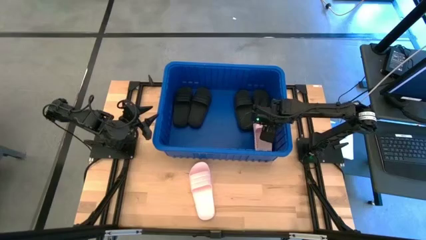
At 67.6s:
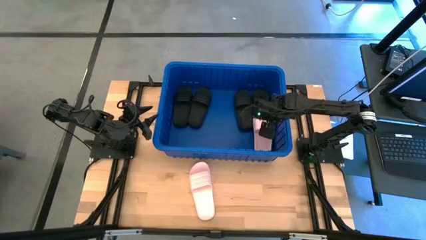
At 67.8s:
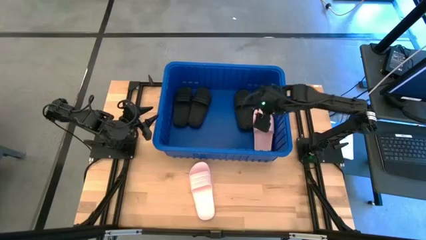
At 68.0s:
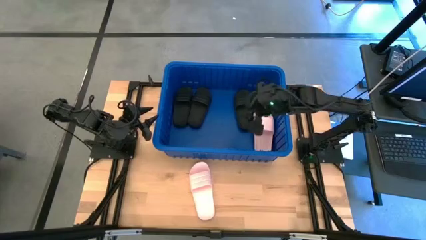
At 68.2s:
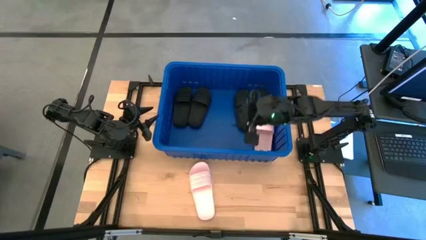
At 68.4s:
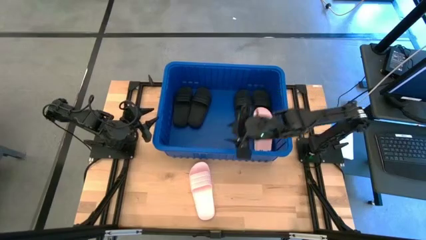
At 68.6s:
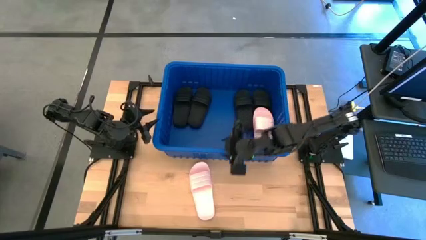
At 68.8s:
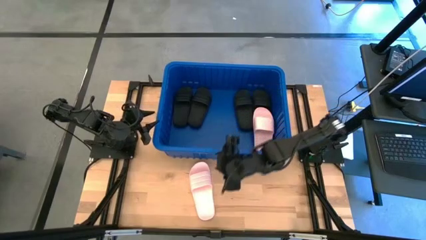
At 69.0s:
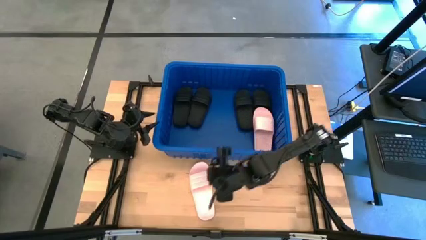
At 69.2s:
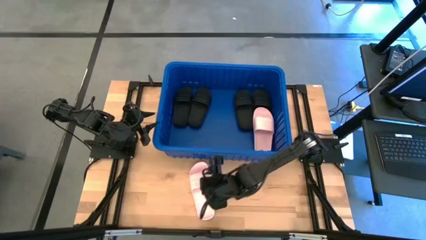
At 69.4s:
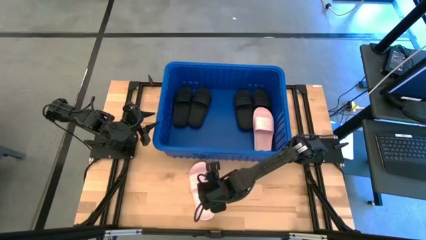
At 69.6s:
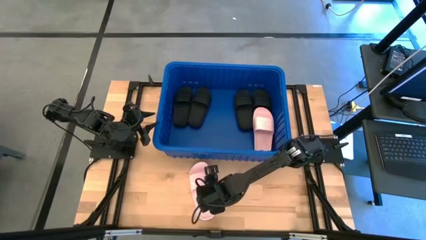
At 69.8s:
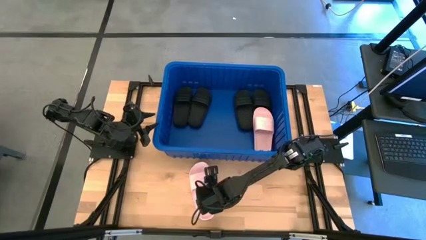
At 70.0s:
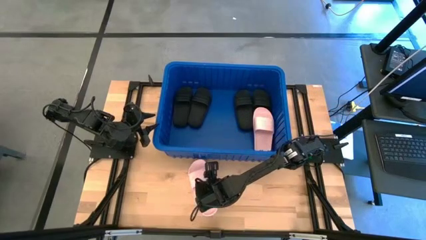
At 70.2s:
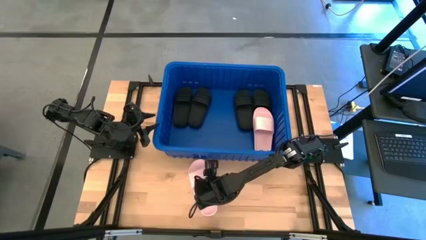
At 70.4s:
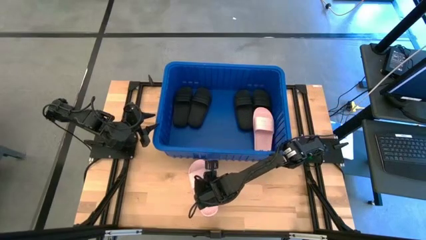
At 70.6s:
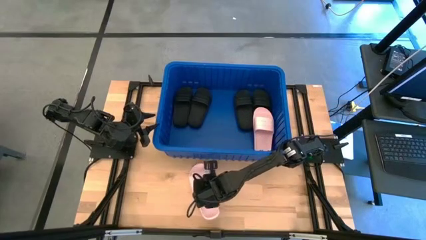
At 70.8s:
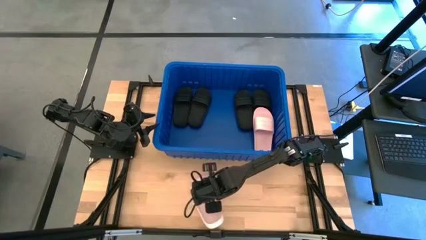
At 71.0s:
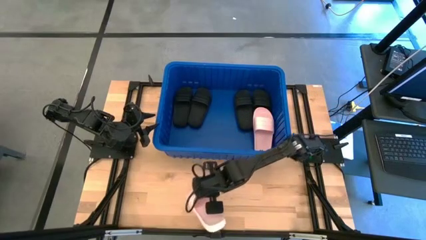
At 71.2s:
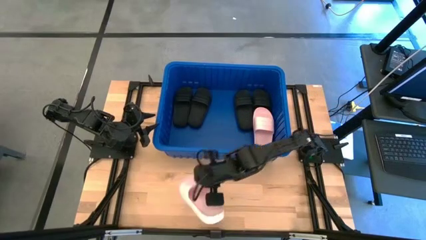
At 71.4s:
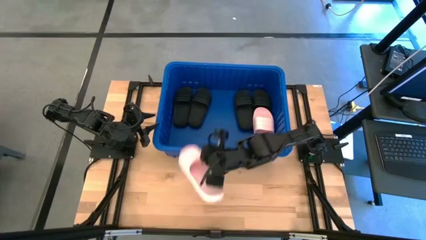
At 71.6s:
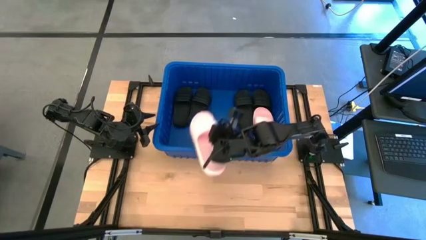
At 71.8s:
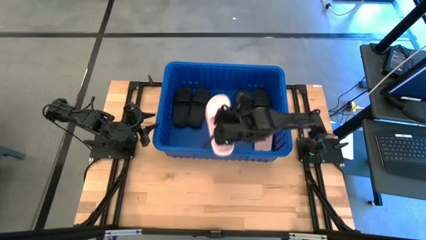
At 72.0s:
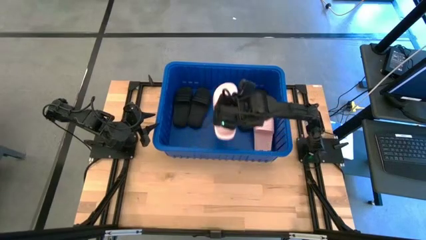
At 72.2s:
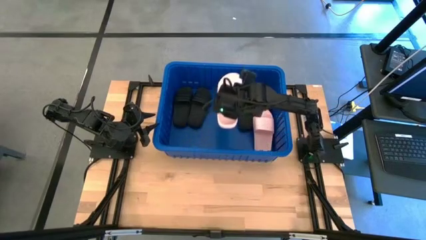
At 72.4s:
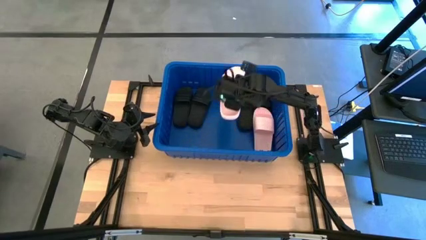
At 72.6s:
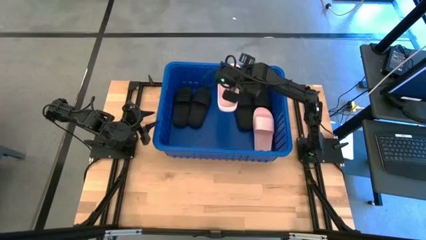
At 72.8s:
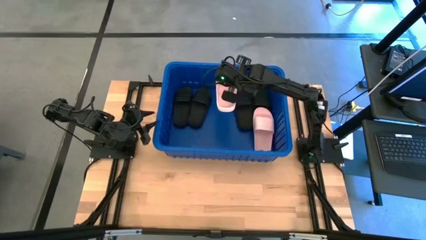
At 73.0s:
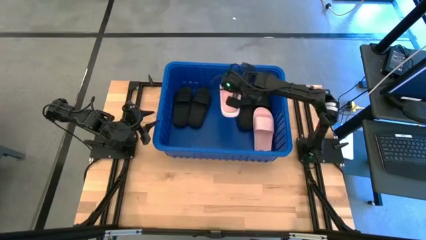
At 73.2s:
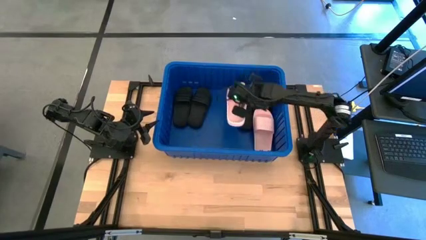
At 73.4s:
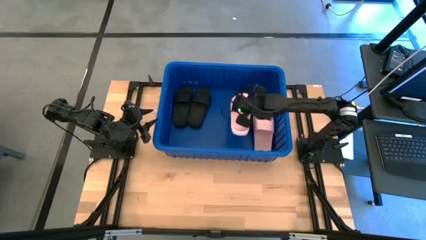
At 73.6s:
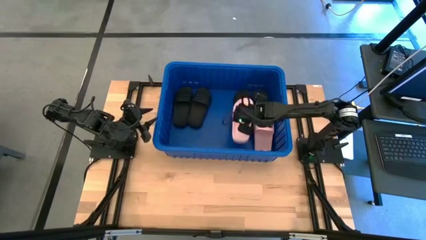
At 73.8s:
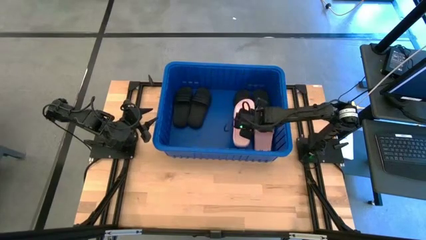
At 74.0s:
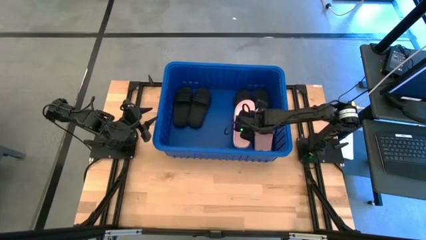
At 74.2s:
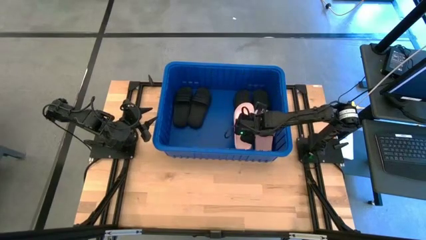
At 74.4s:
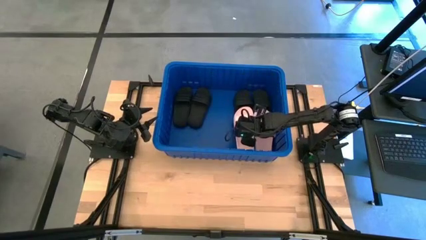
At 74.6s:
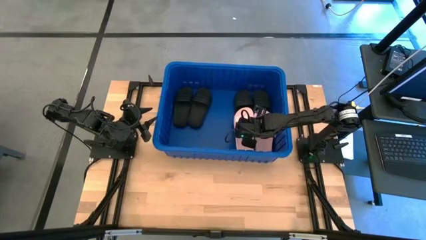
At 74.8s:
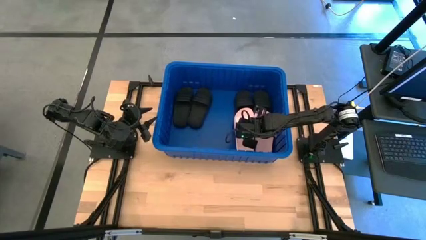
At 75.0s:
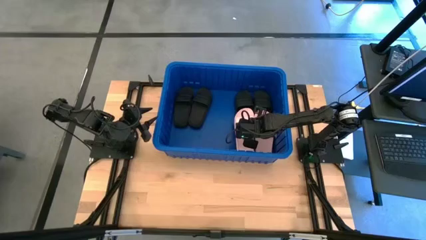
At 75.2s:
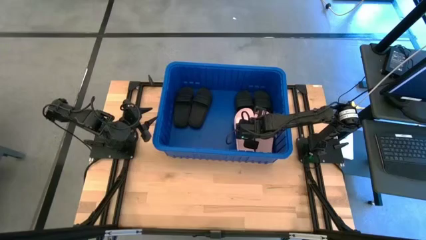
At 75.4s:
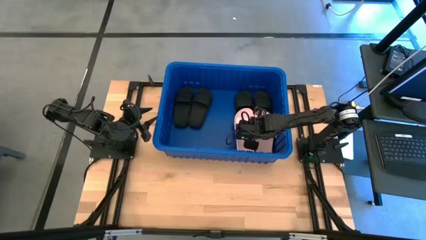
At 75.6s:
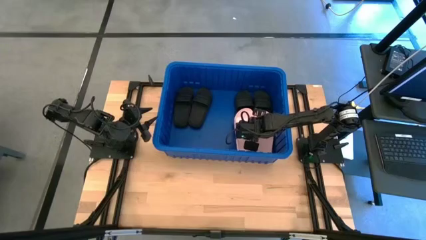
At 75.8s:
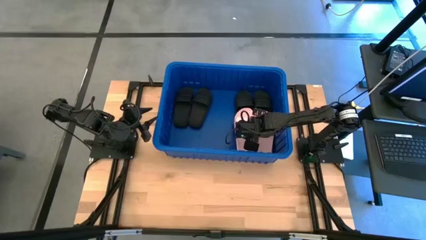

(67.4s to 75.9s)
Task: Pick and place slides into bin
Put the pink slide into the blue bin

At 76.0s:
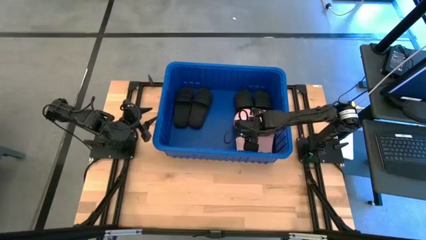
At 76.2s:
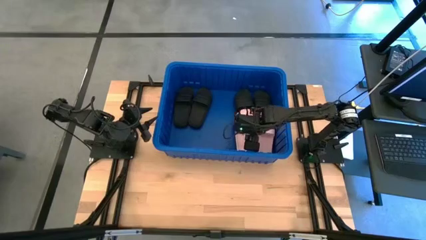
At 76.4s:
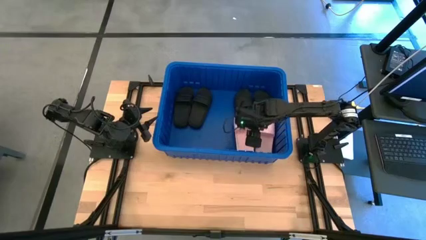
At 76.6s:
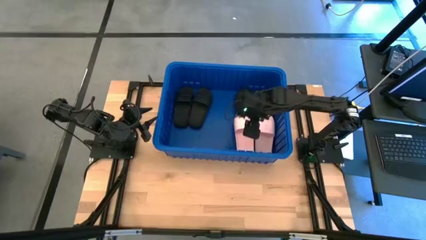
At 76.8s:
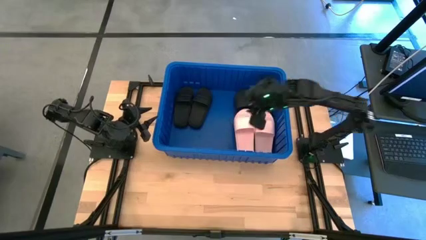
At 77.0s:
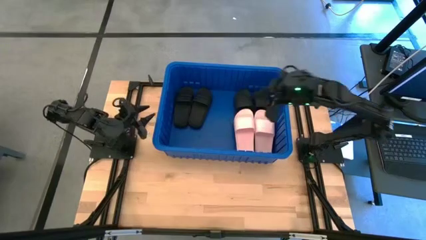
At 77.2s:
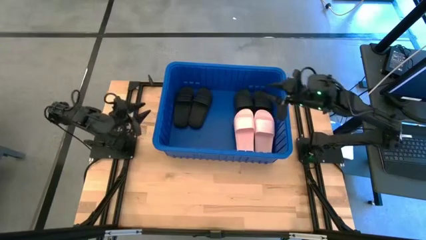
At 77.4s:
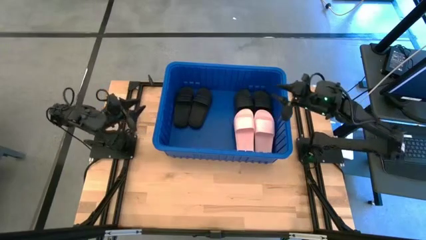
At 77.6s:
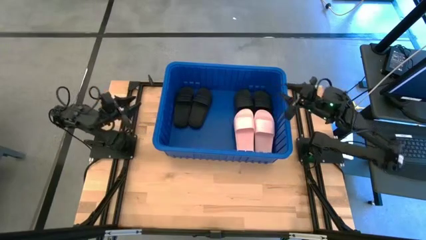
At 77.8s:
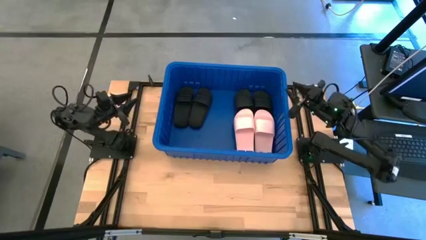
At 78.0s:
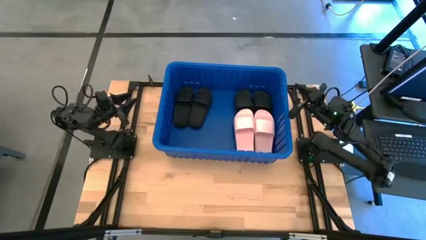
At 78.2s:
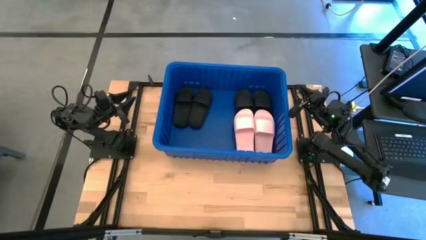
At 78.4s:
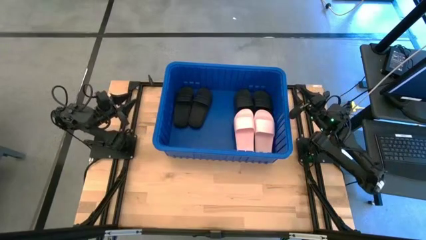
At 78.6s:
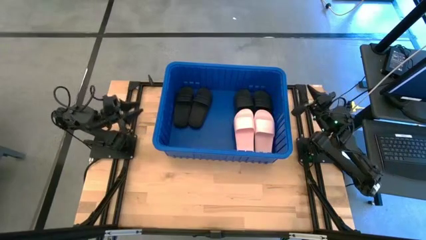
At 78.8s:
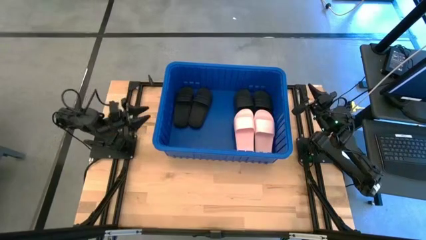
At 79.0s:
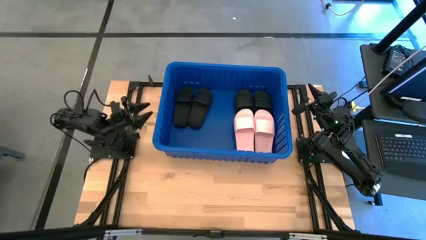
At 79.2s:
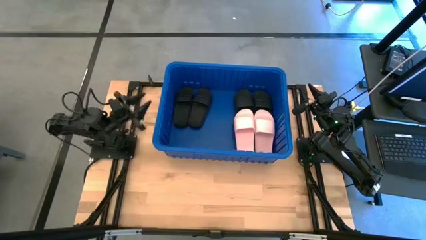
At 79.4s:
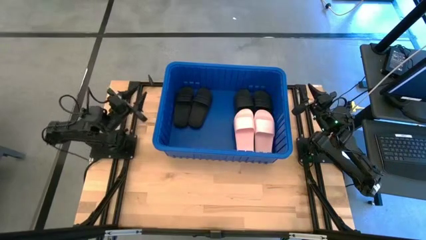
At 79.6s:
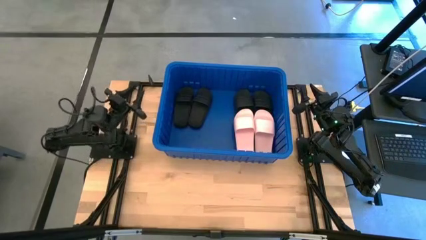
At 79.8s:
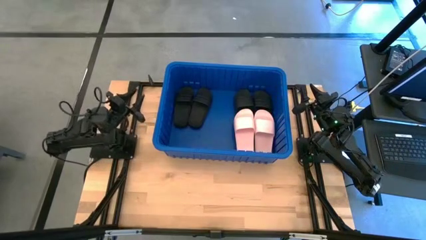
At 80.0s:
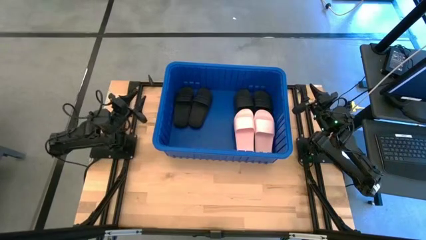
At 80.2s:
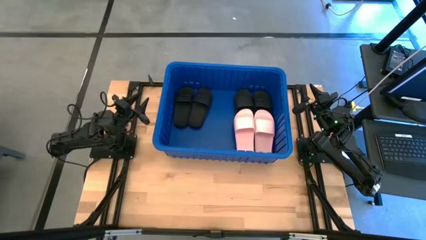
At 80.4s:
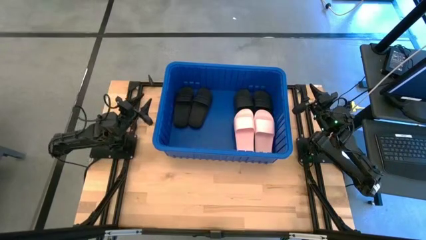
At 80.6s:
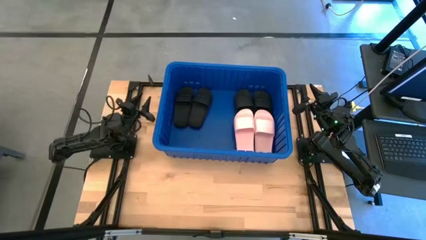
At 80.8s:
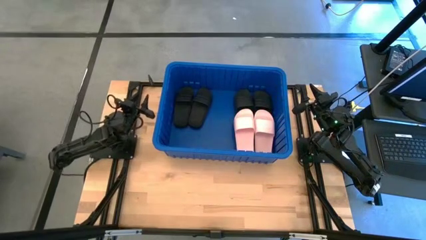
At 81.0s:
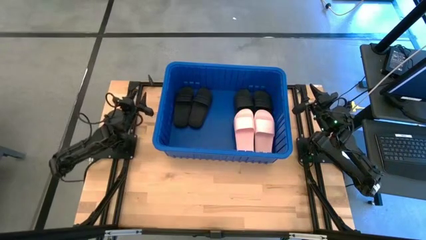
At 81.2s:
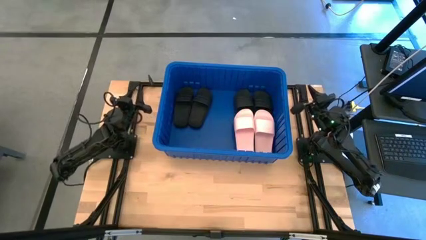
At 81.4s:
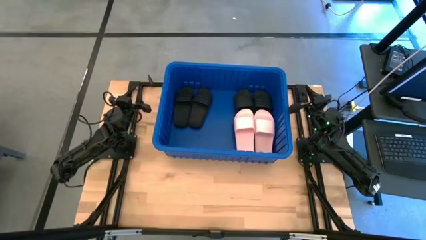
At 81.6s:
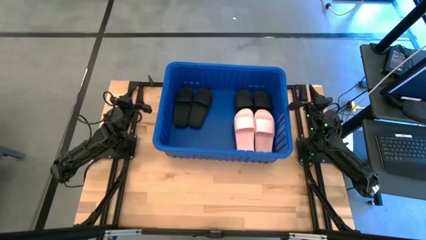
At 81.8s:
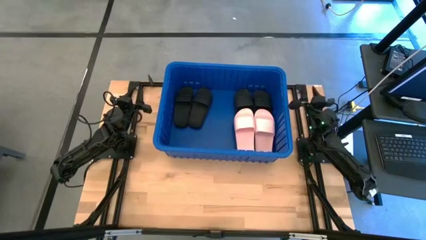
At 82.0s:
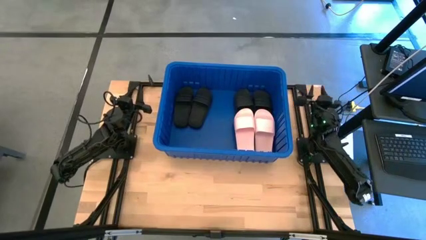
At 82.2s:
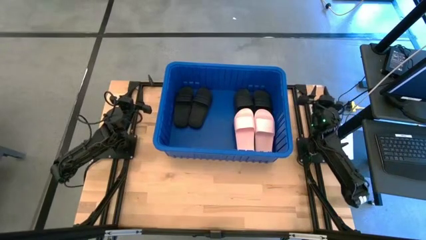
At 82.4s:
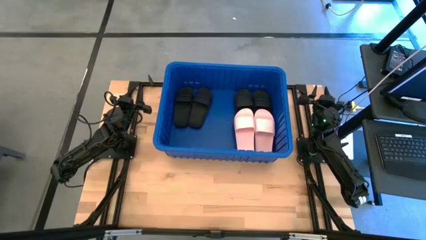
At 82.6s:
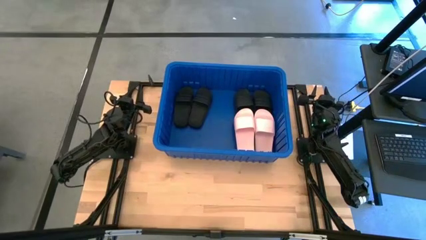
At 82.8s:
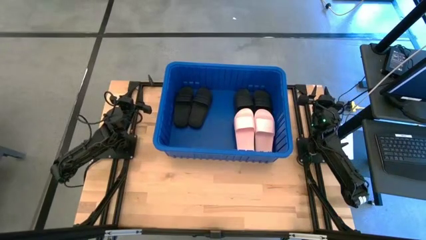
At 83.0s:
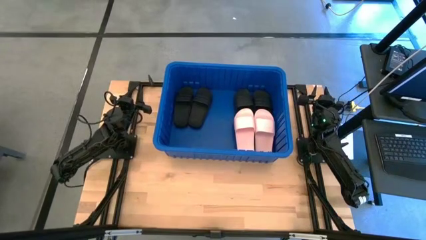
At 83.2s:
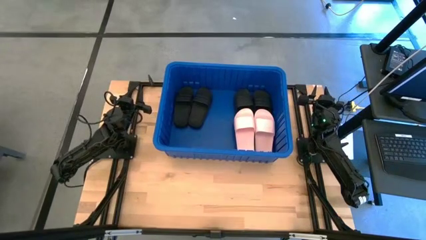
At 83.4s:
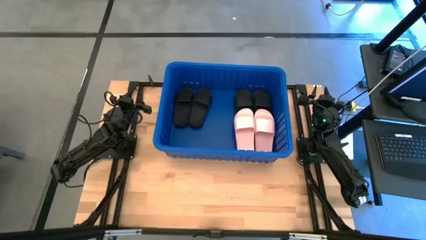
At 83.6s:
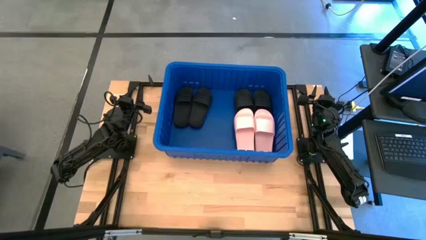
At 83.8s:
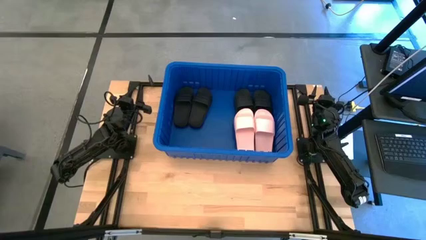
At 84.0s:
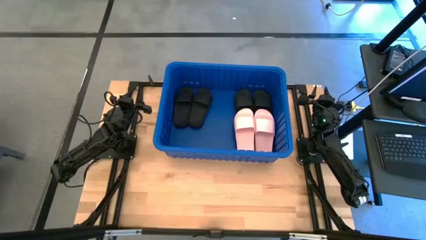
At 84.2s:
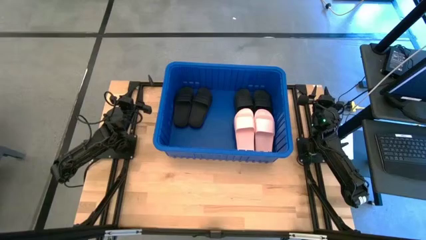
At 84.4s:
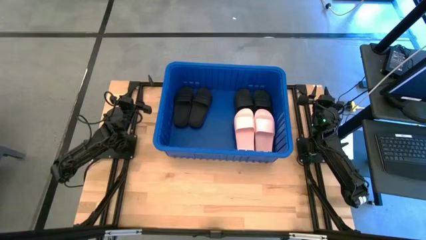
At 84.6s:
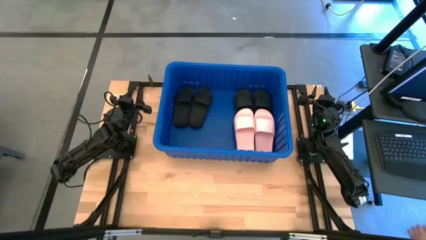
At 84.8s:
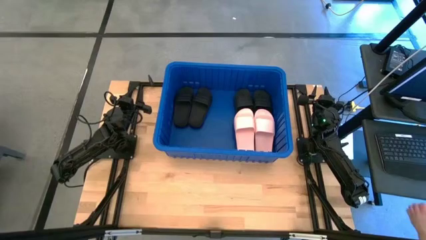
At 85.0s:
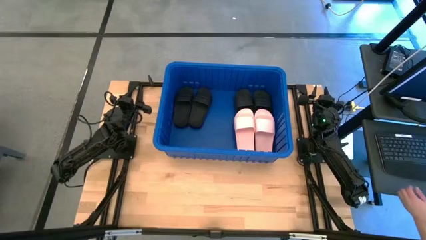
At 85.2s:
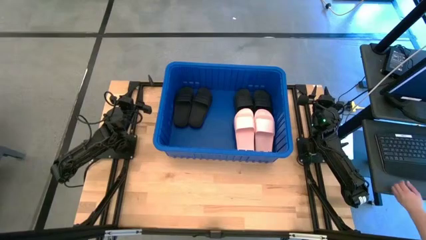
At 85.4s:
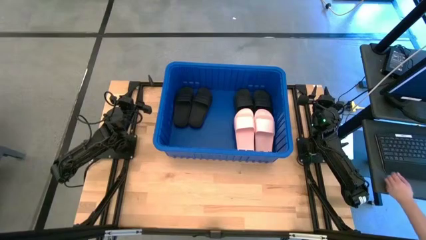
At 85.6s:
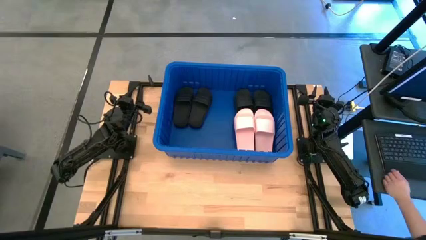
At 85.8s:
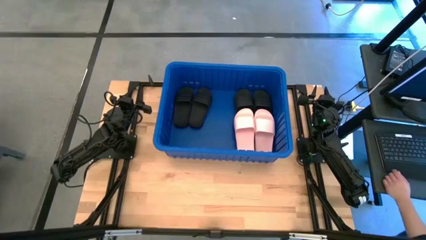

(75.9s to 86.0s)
Return to Home Position
